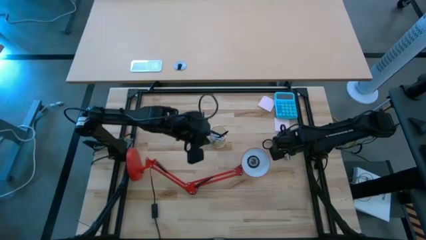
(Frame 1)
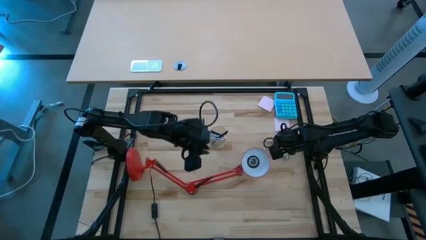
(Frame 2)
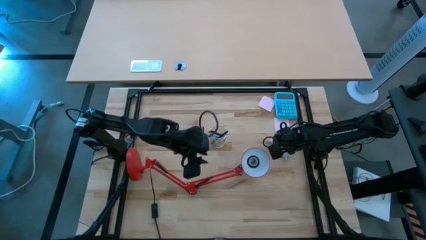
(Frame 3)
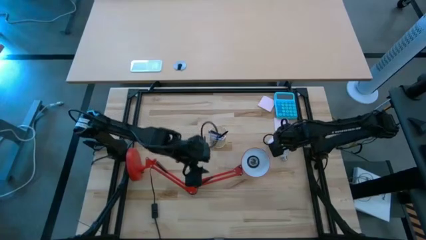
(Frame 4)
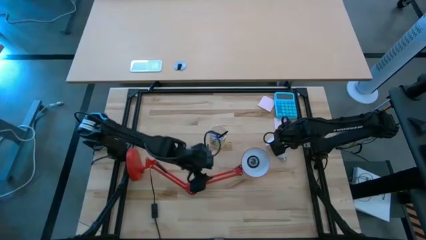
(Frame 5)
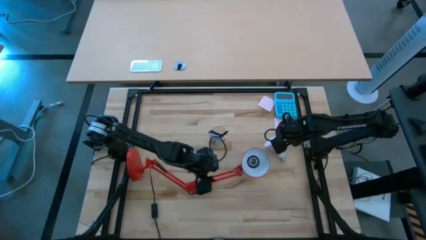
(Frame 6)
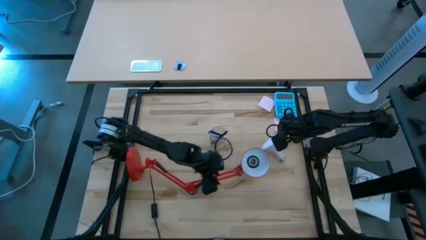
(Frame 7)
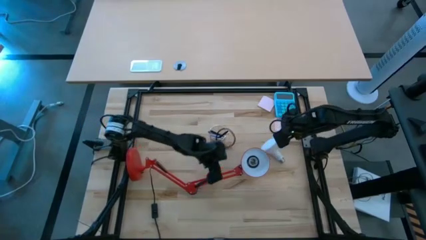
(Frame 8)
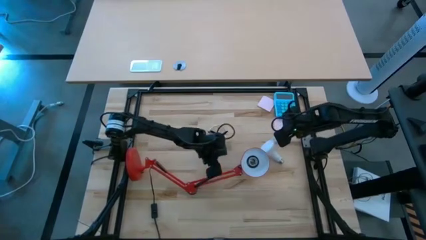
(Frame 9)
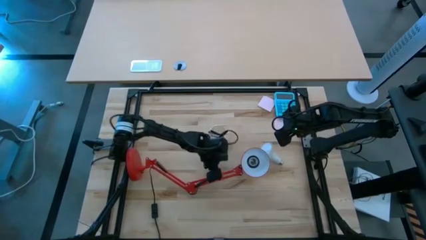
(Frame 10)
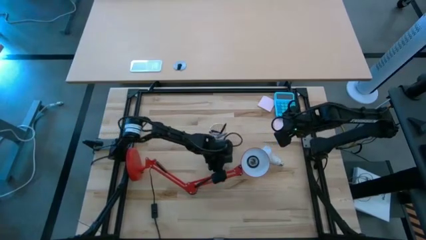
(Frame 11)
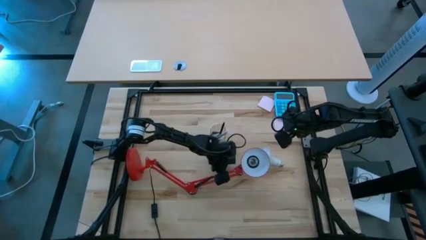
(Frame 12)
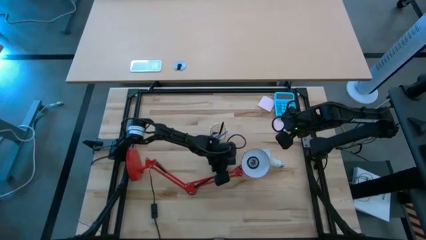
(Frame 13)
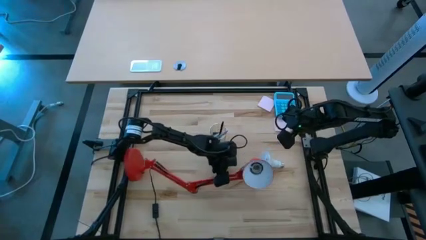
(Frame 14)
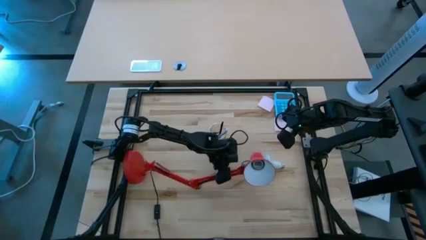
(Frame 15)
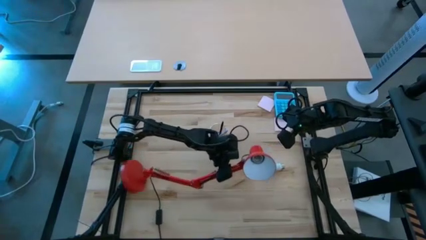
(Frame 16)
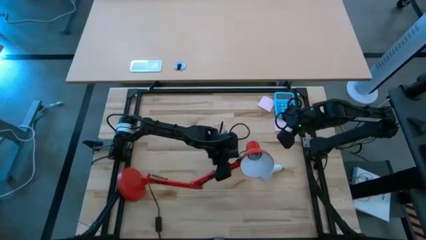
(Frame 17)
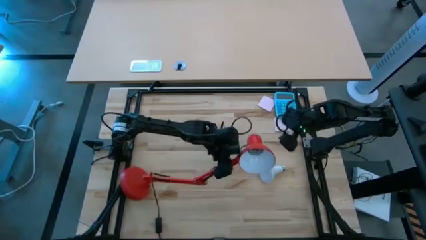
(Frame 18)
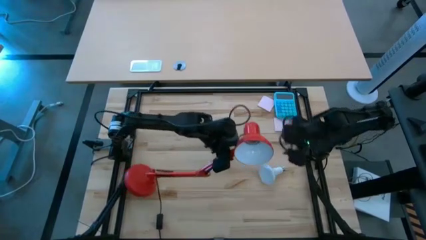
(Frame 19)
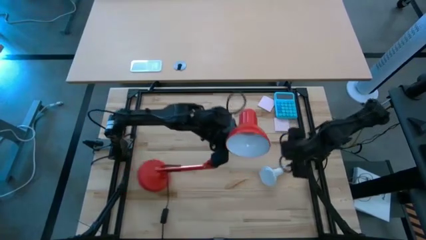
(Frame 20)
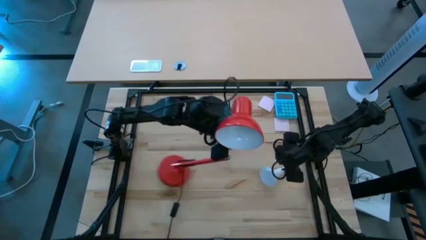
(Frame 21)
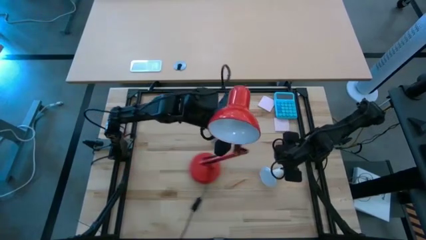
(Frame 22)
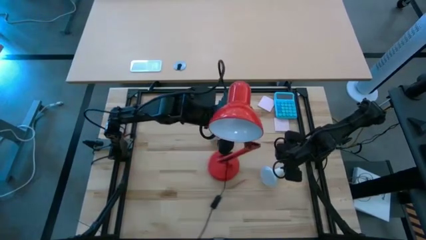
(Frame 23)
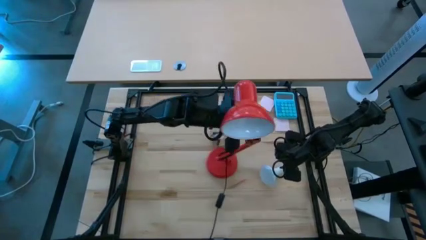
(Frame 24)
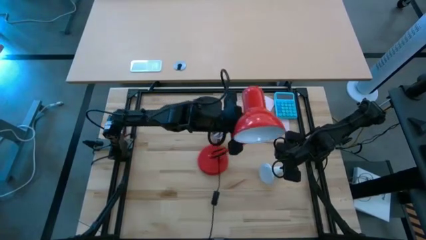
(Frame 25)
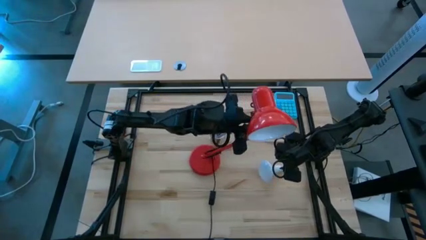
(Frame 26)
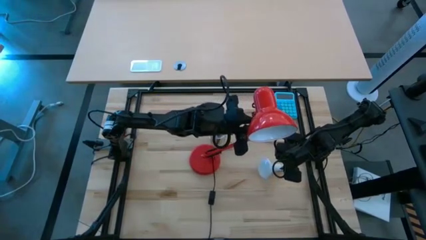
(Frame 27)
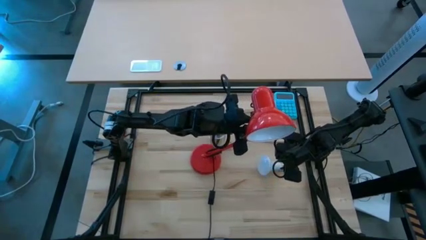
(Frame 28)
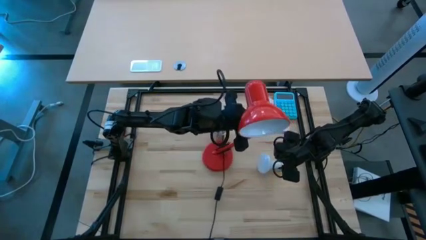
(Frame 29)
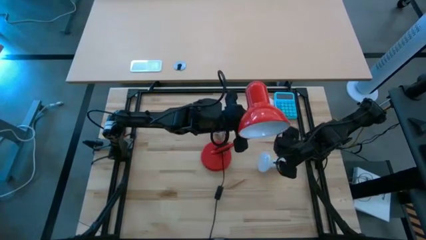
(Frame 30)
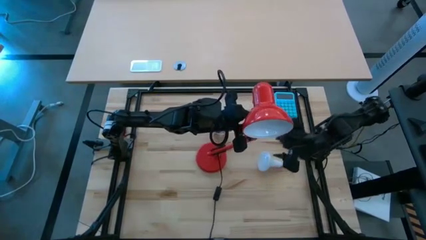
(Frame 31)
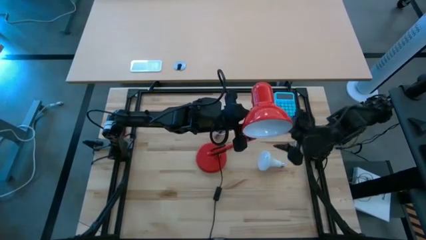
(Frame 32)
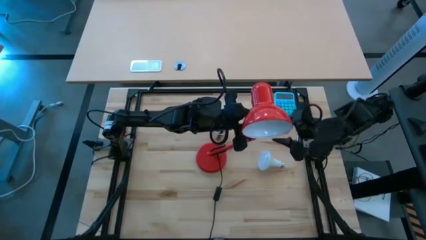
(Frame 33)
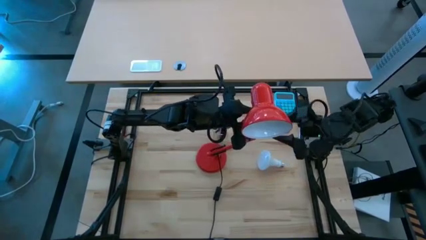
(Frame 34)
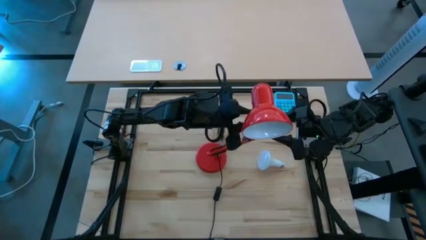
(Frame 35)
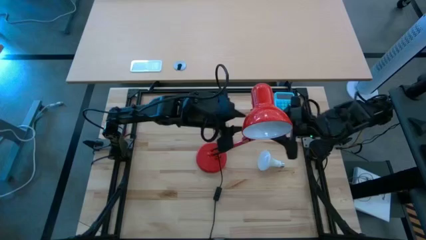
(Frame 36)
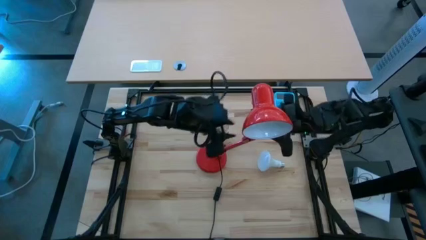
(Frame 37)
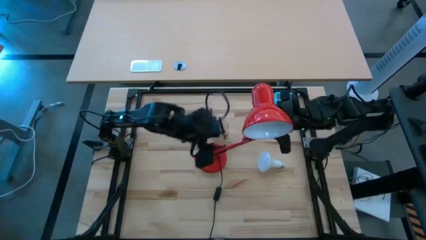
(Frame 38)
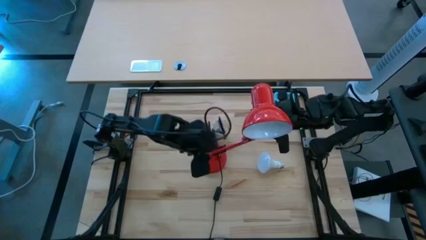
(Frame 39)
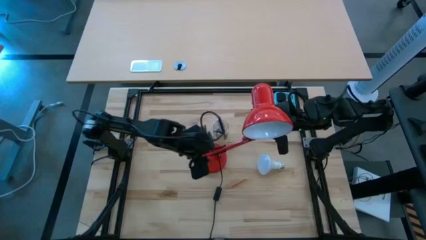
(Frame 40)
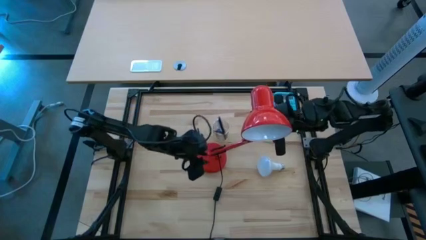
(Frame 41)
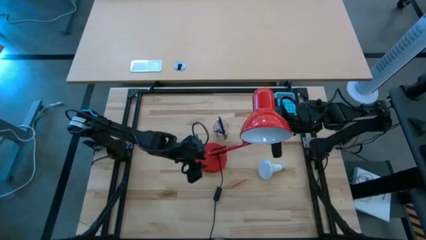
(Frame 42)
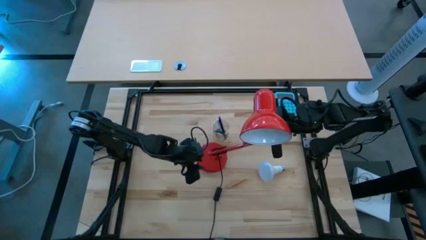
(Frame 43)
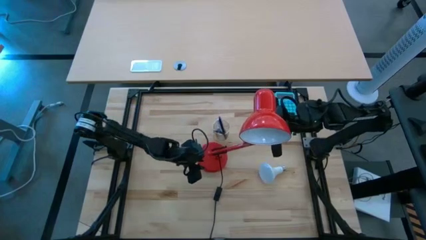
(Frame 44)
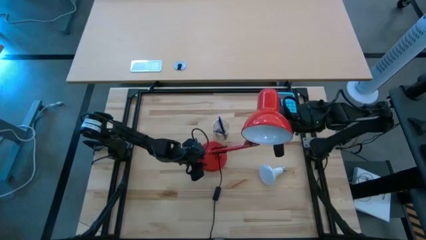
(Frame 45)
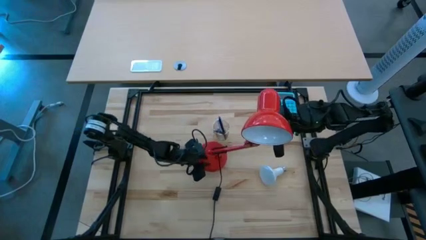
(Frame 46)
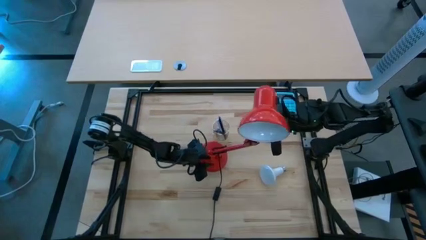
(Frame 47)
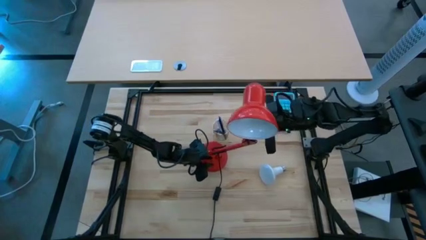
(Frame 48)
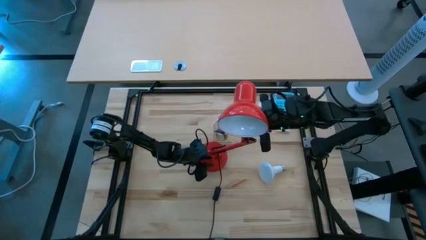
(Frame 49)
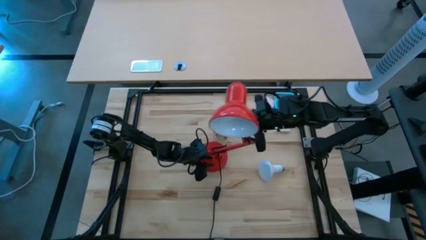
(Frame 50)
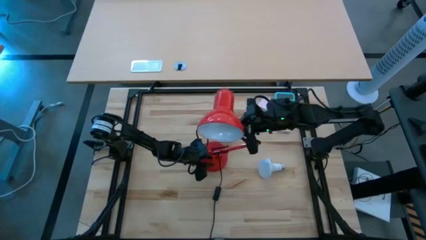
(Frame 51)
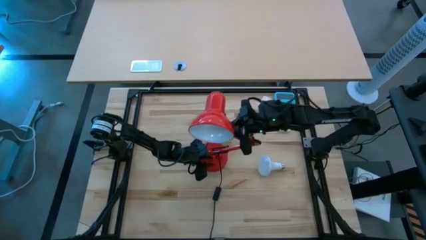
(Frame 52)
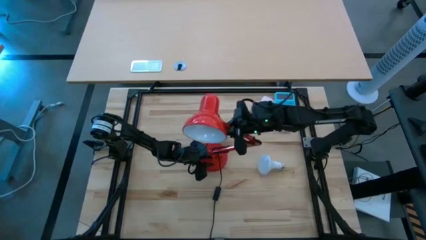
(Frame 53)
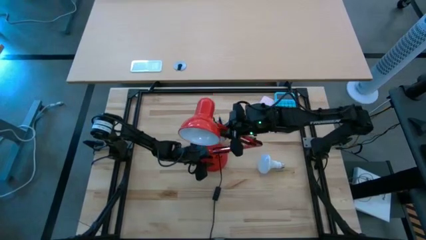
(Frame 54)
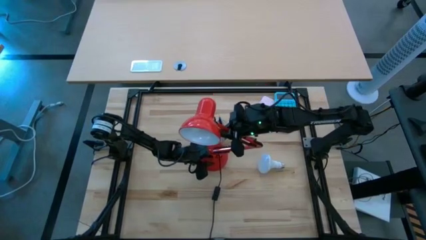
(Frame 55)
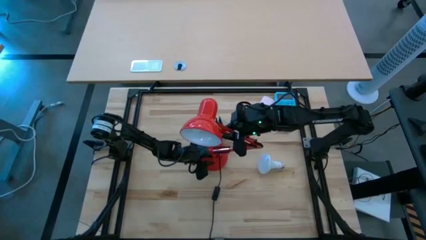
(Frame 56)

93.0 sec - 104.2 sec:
Task: Screw lightbulb
Adjust the lamp

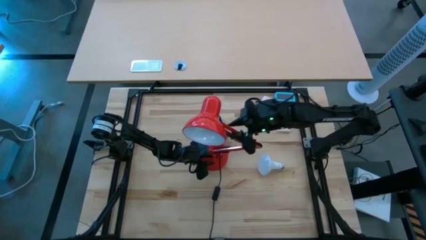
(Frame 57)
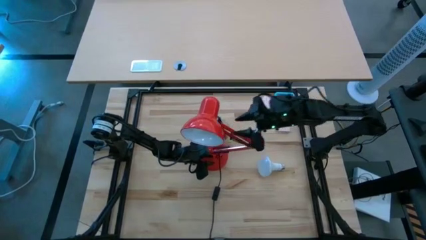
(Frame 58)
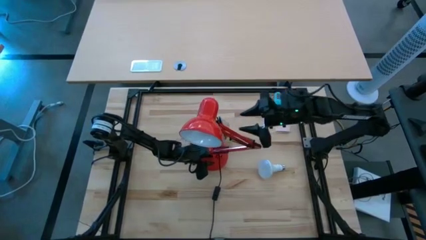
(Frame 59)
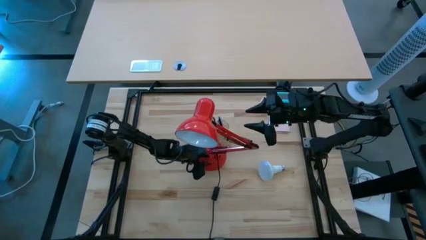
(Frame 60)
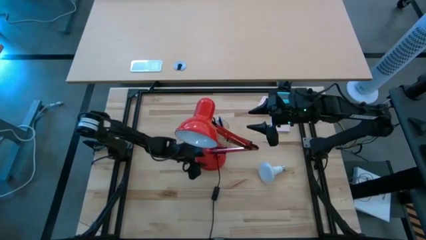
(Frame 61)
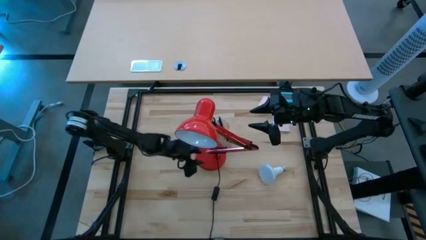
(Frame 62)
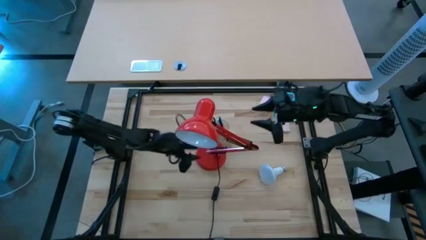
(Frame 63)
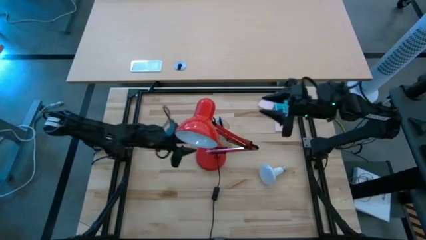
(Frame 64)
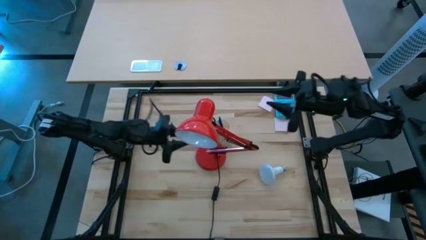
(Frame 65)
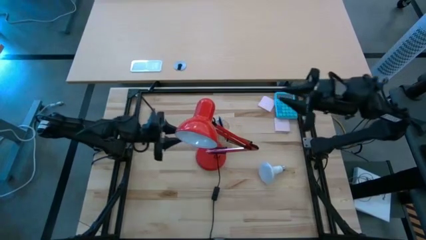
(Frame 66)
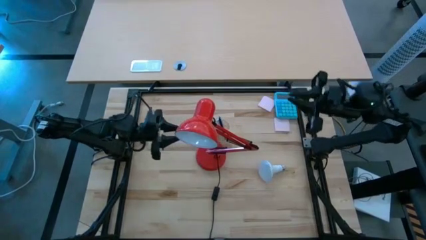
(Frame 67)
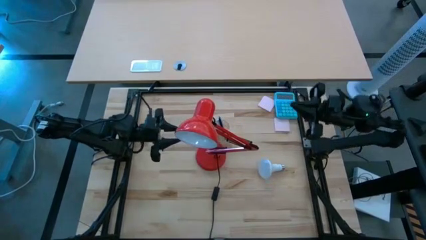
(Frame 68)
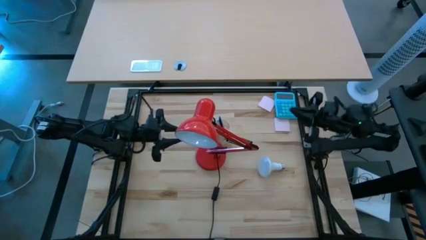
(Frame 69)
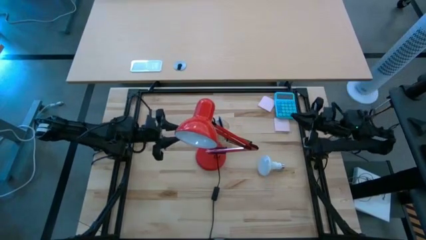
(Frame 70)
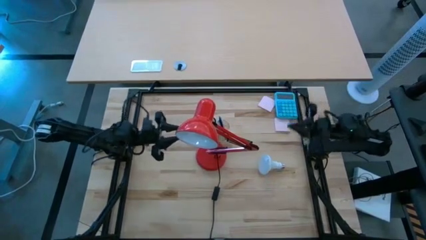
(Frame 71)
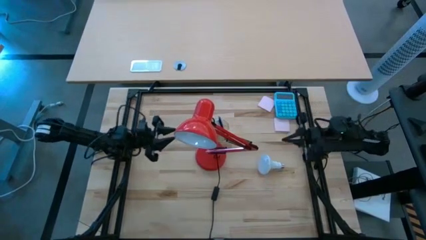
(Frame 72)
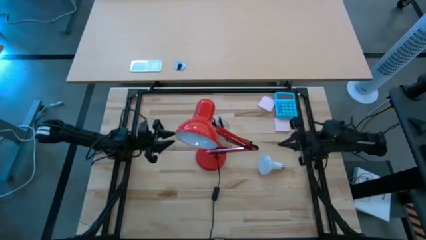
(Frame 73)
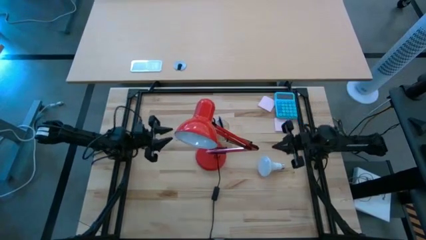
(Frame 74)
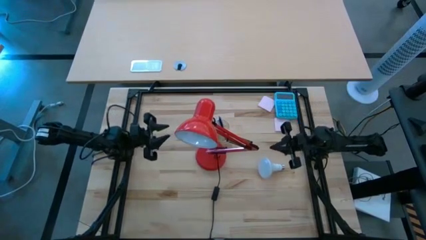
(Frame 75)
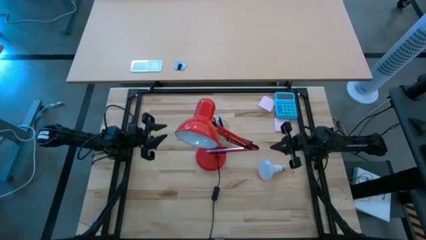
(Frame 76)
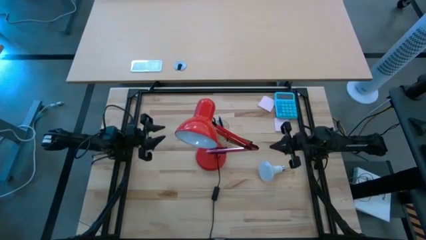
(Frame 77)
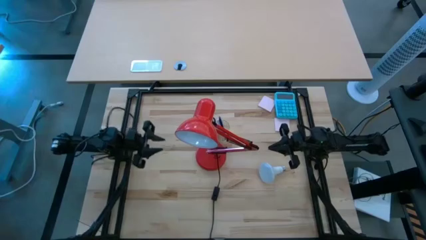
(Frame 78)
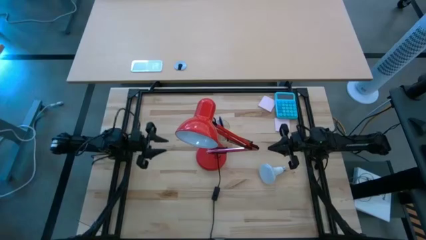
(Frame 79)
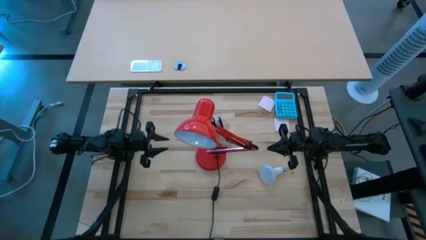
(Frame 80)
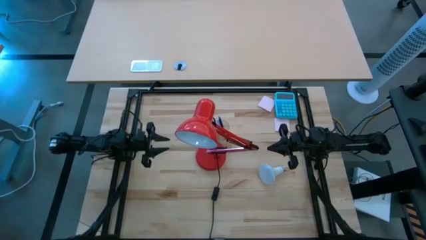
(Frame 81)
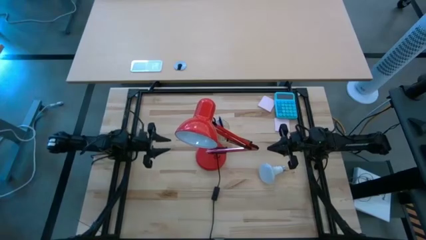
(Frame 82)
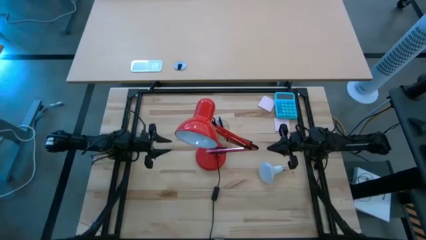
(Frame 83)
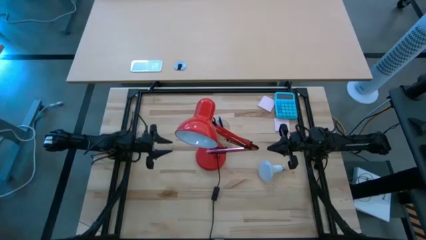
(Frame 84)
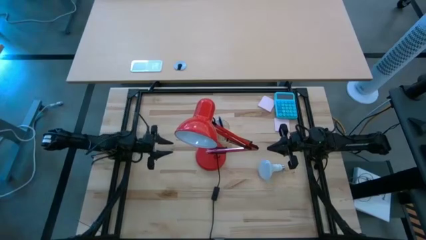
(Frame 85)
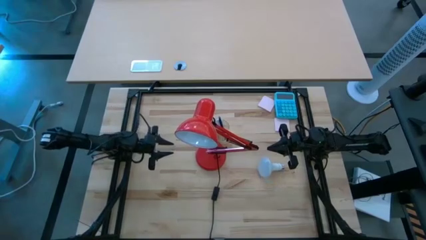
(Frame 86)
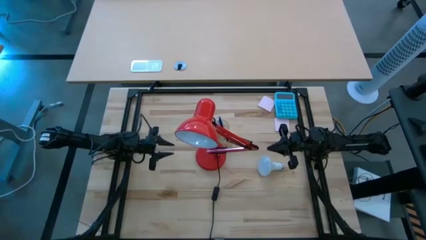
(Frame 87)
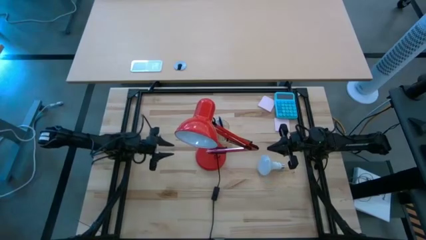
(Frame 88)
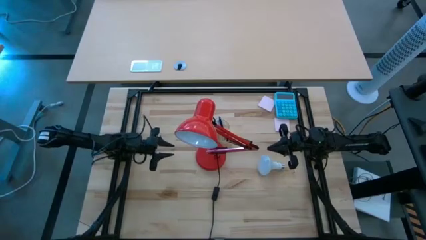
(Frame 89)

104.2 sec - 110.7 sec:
Return to Home Position
